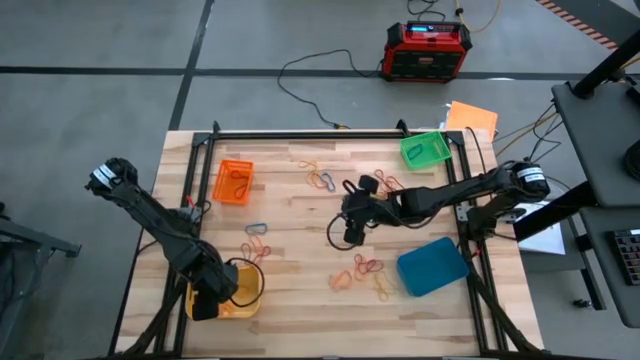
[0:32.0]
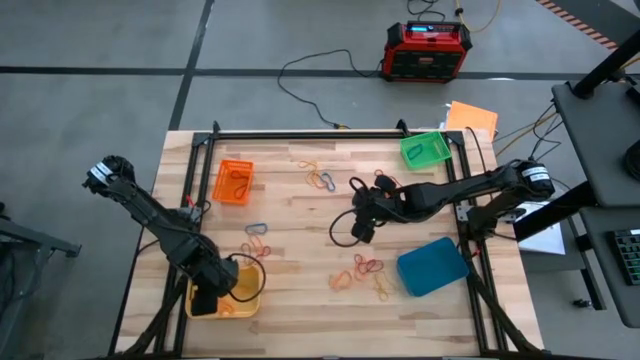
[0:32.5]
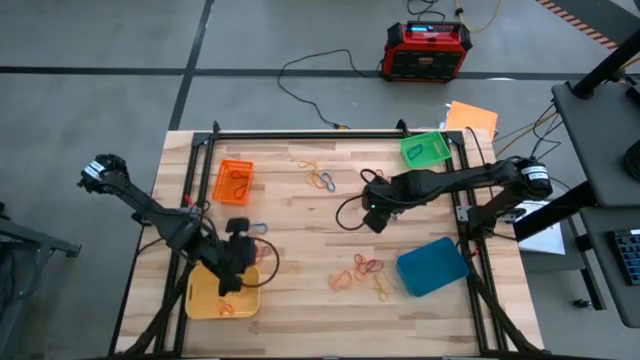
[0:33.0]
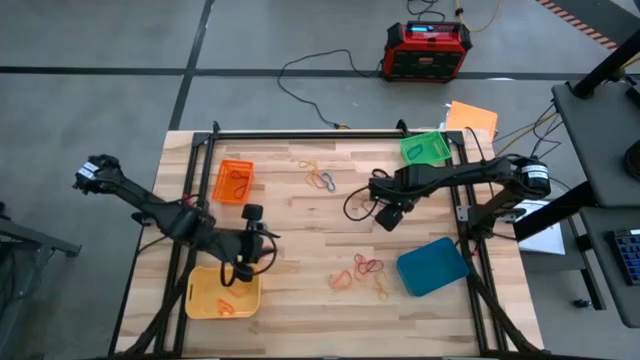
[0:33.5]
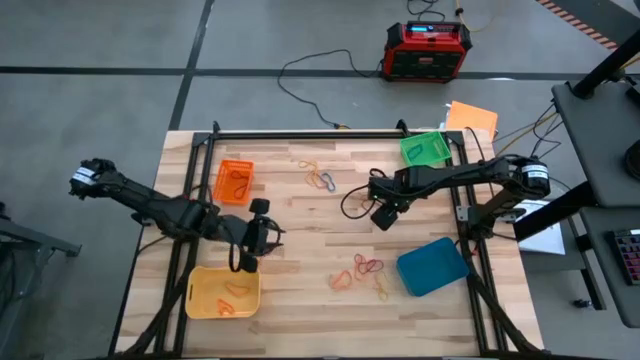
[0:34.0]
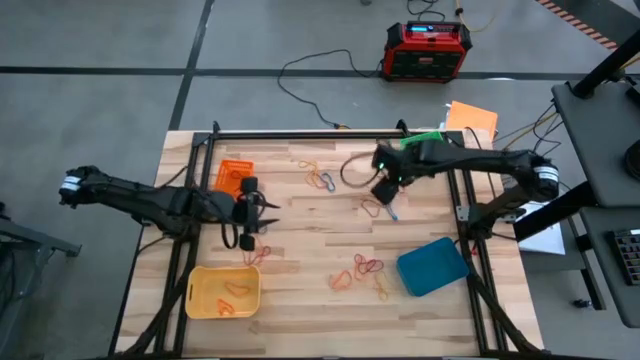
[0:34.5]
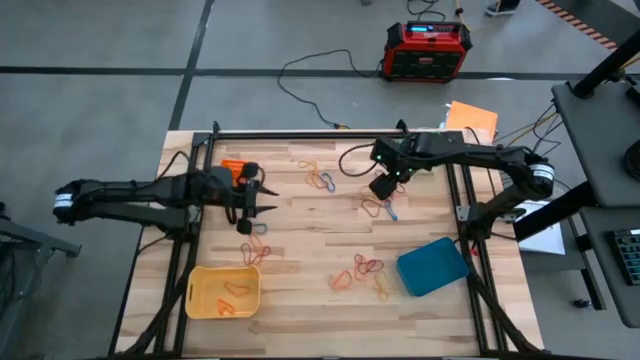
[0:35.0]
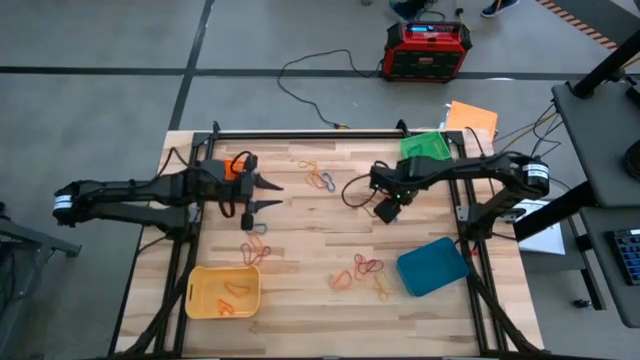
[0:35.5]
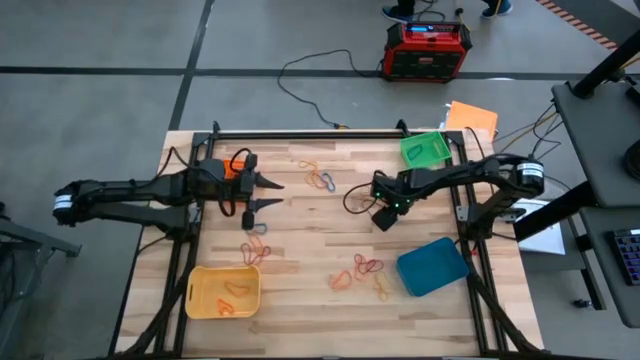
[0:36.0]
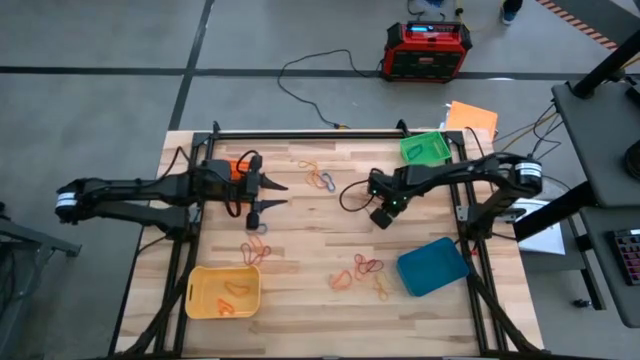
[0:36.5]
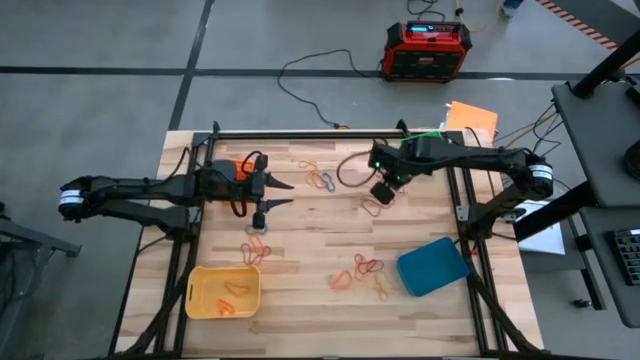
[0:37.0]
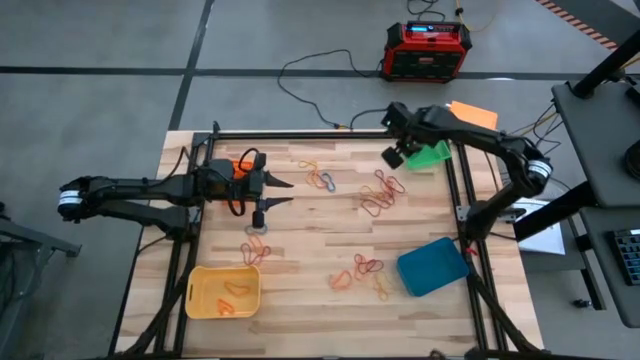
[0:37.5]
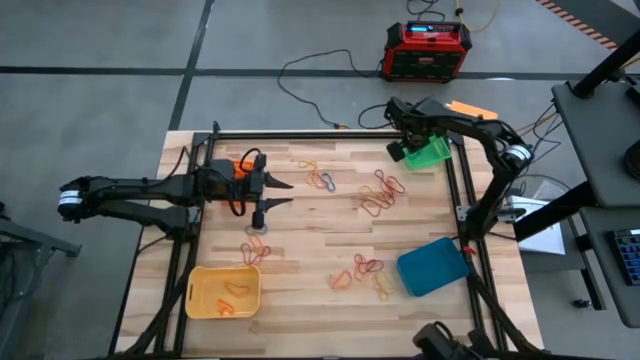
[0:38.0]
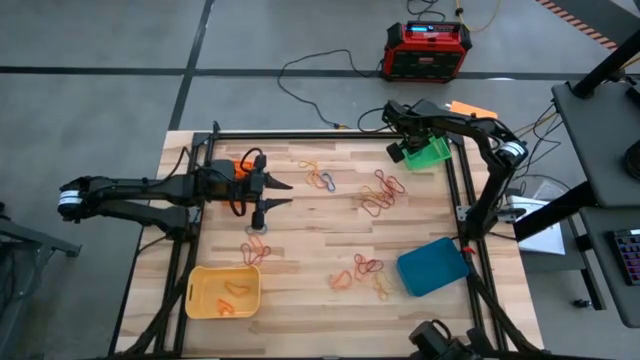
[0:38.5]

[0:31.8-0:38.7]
Task: Sort rubber bands into baskets
Put the blue rubber band into the green bin

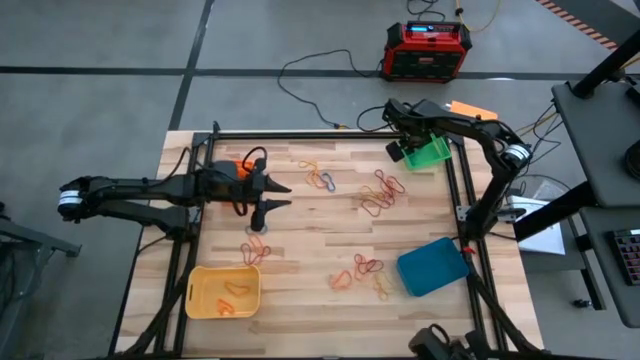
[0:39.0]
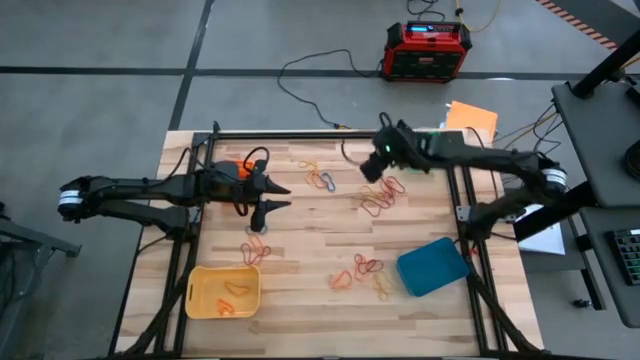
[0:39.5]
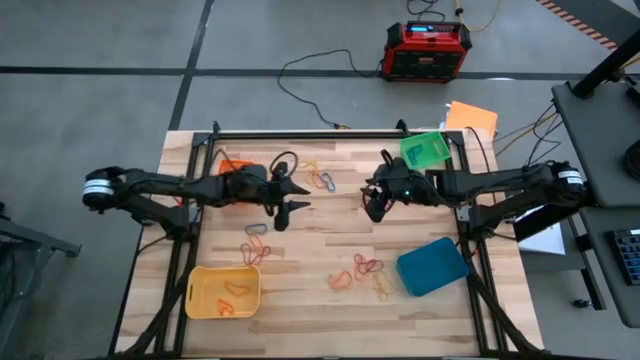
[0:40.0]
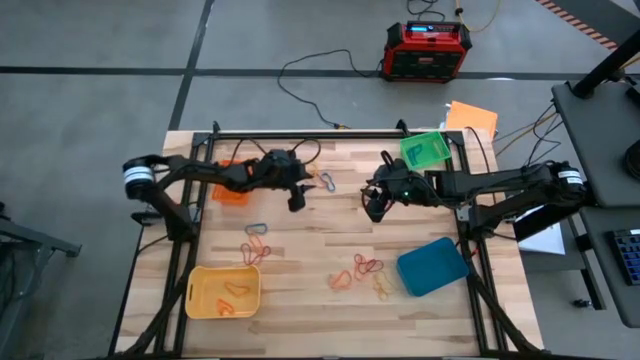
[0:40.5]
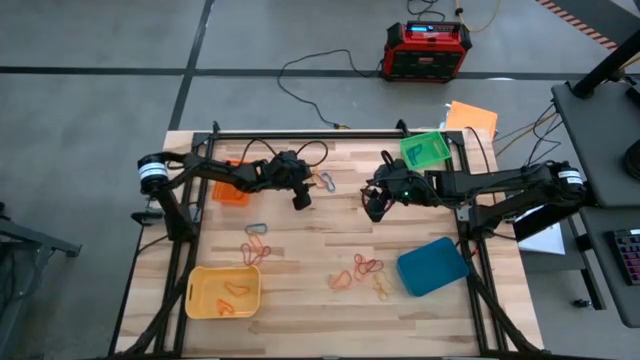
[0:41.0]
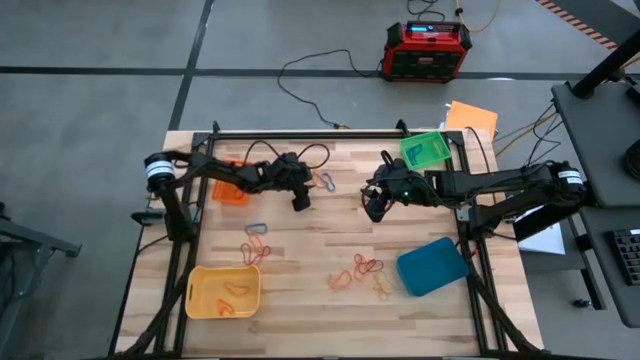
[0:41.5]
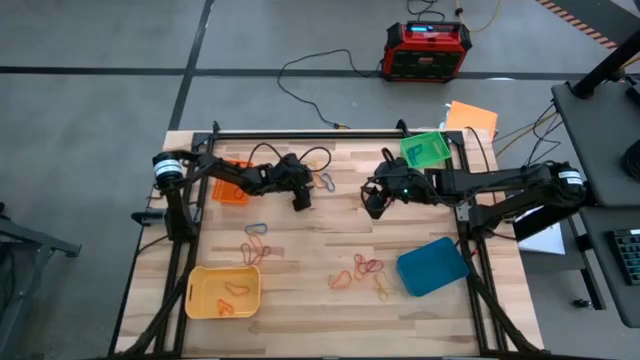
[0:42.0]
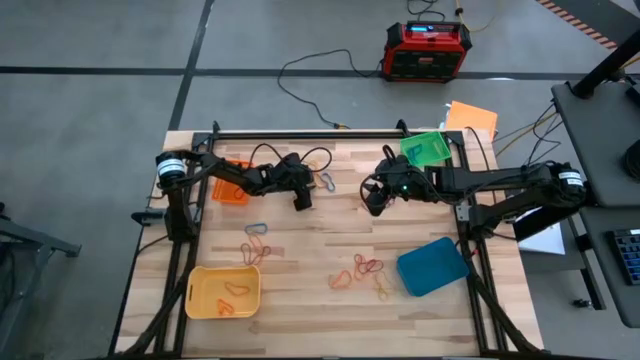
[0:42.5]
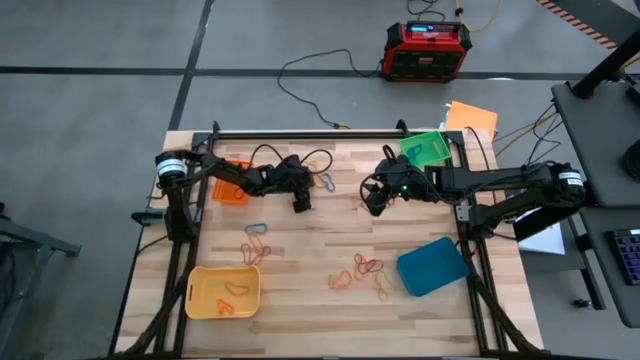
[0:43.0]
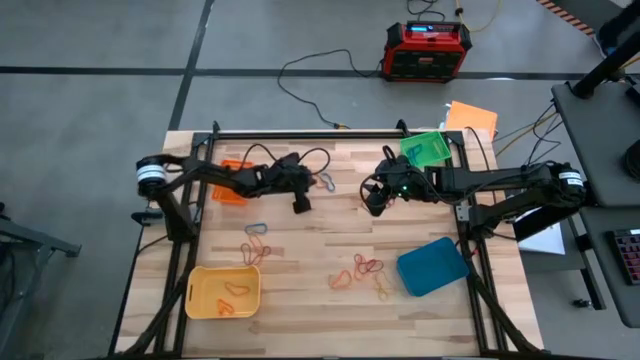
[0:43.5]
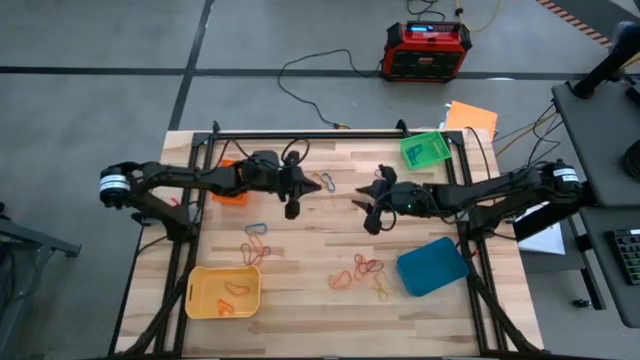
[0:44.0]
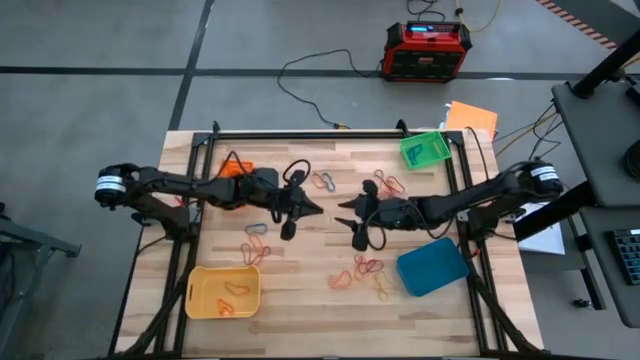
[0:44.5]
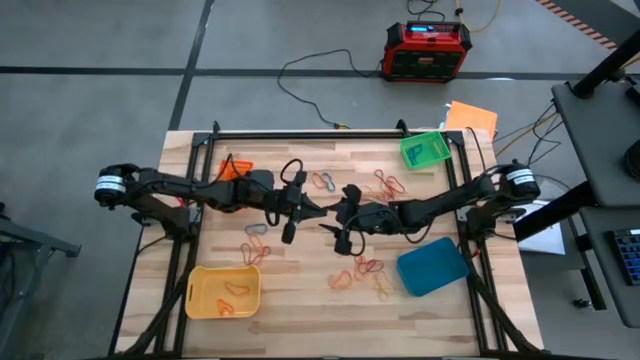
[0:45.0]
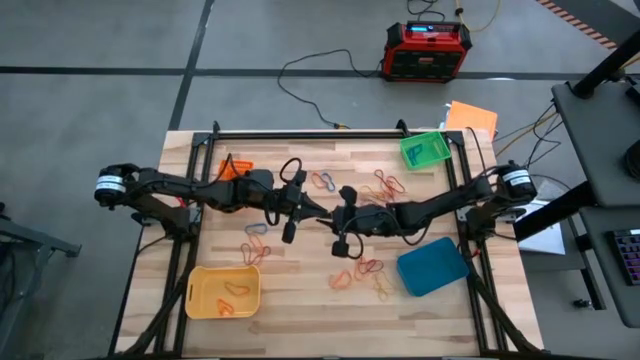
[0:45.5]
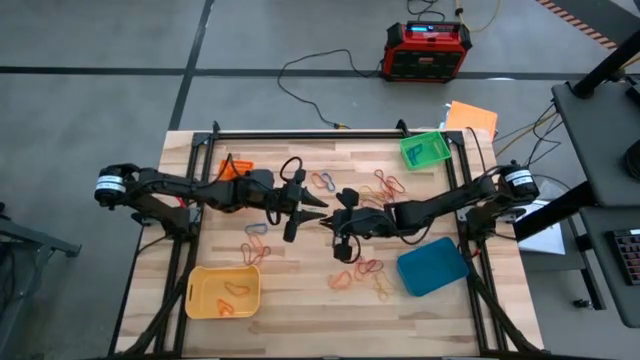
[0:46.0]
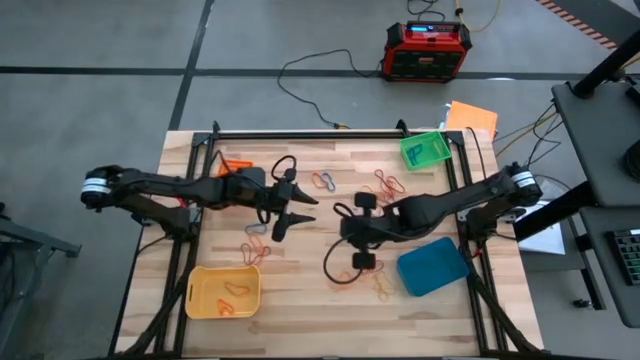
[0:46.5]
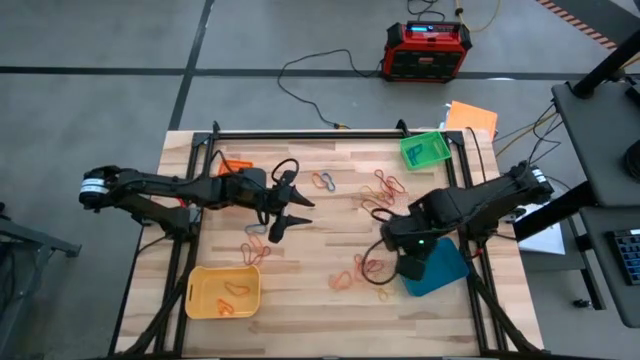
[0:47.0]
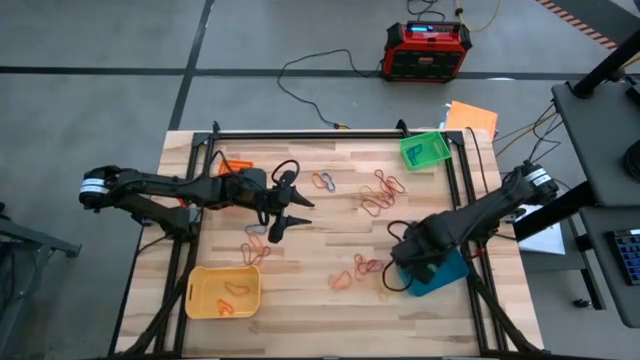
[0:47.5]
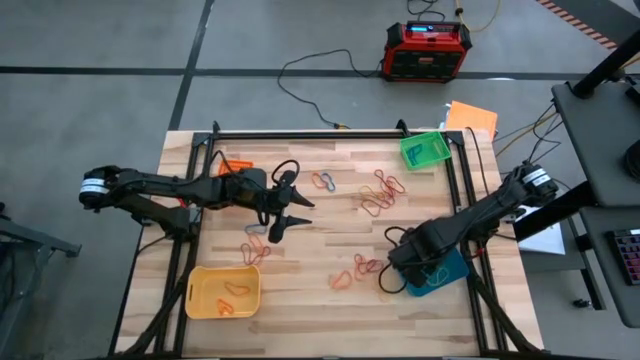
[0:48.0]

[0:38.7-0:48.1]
Put the yellow rubber band into the blue bin

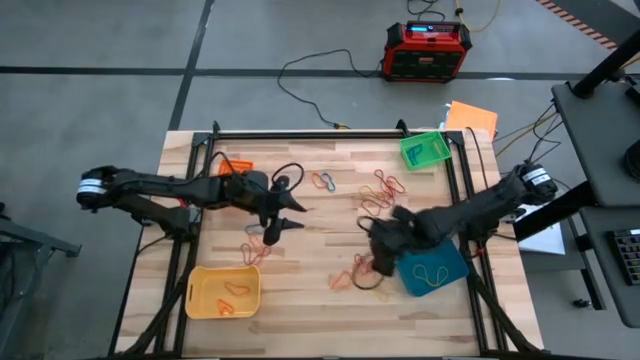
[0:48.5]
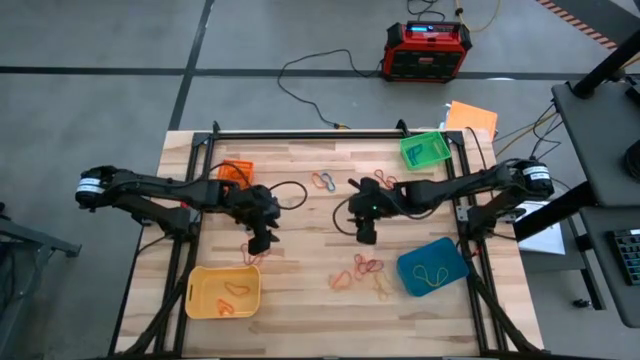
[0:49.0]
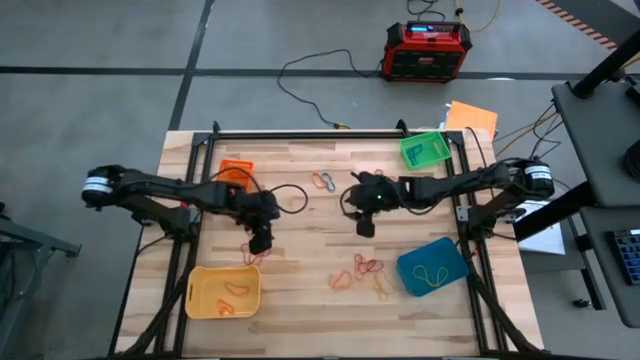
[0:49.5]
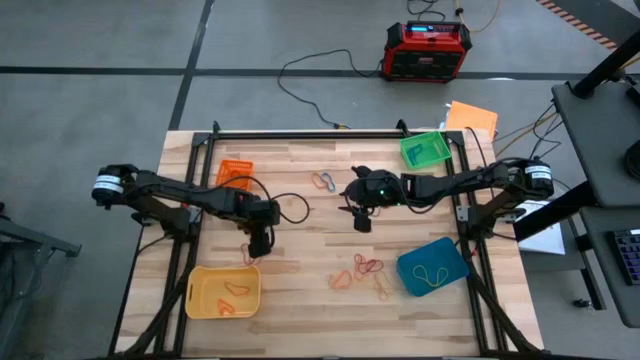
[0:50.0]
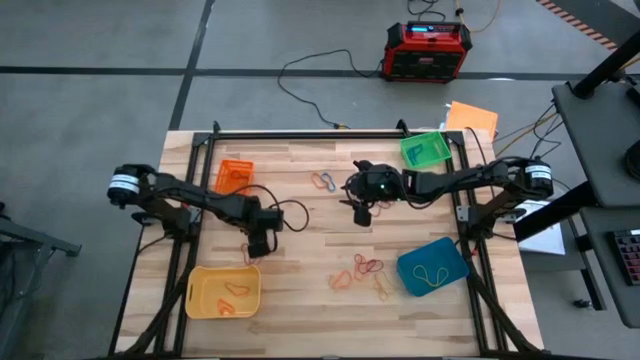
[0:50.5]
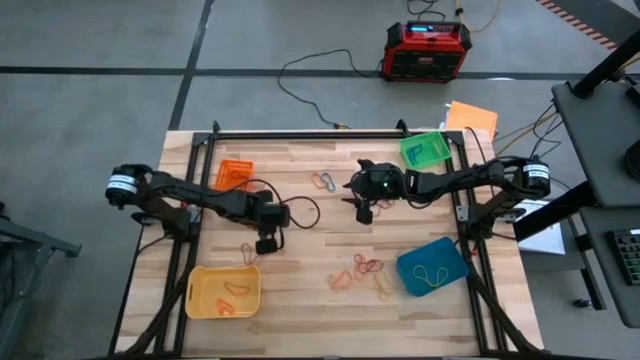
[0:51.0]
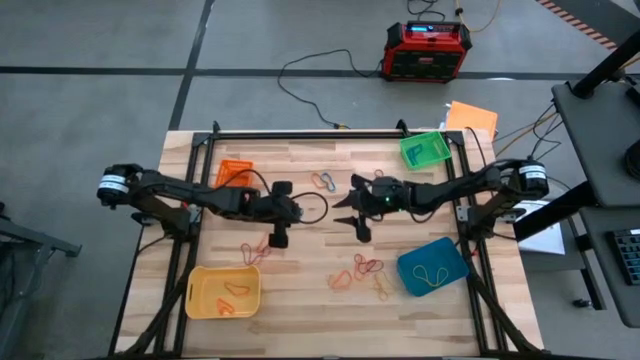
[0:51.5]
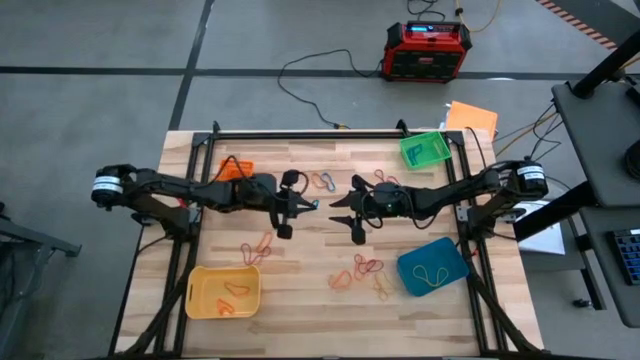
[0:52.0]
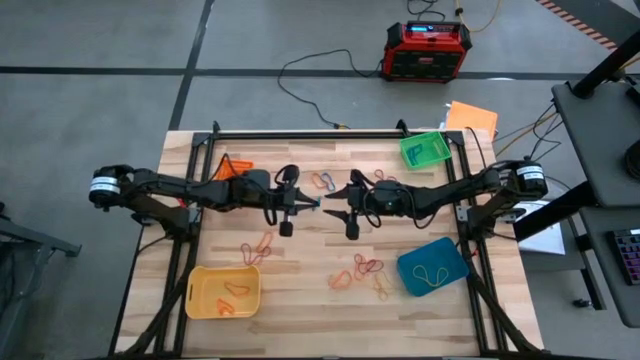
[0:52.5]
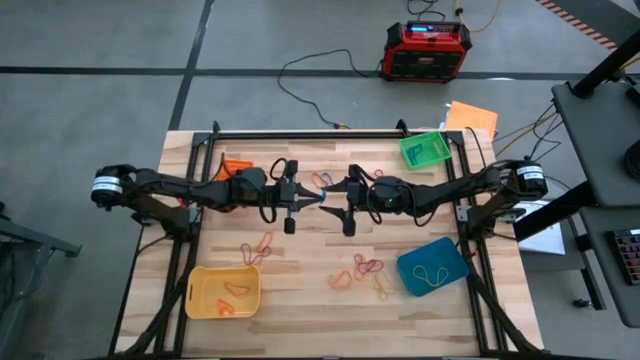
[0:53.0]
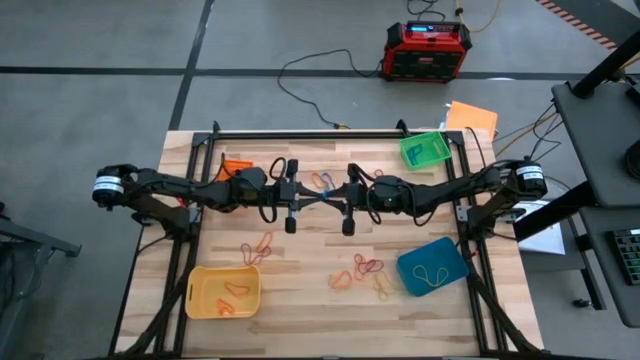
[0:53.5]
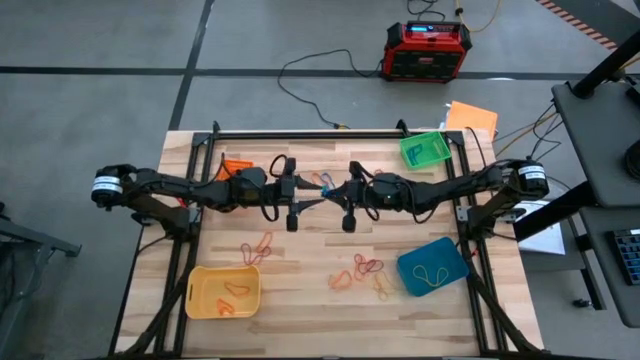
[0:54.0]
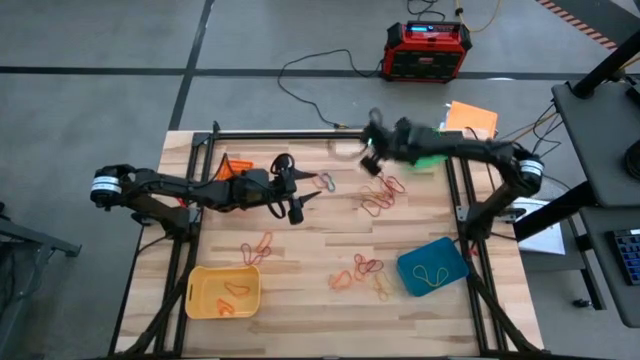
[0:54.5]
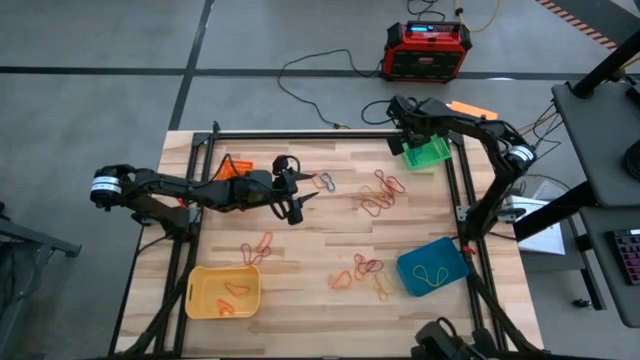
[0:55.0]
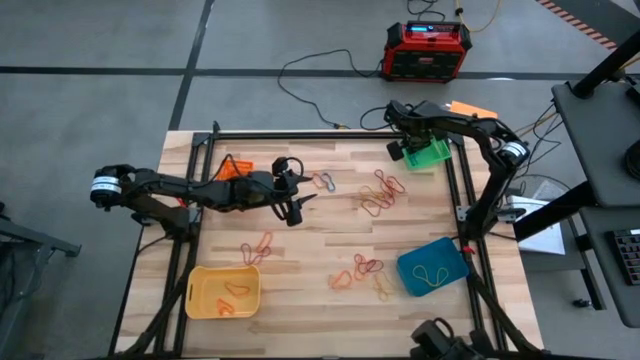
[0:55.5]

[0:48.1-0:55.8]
Put the blue rubber band into the green bin
